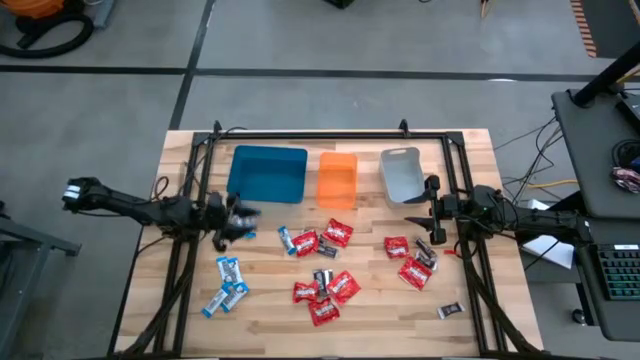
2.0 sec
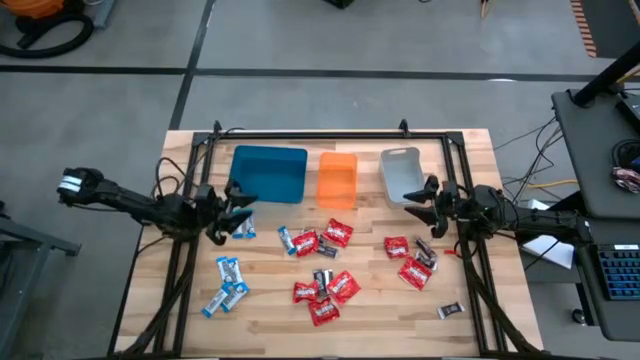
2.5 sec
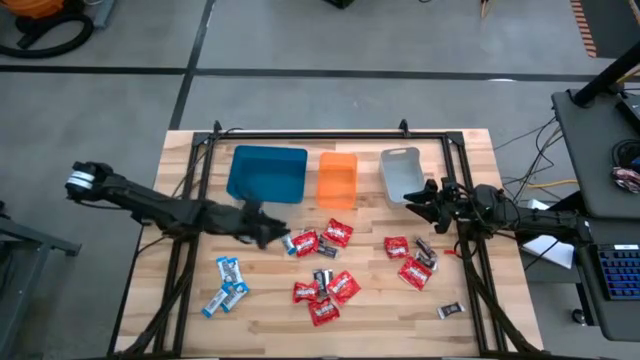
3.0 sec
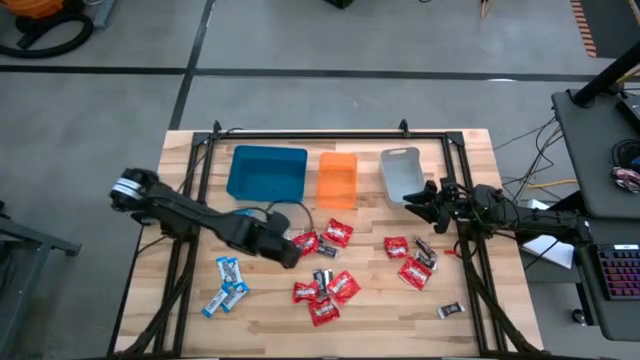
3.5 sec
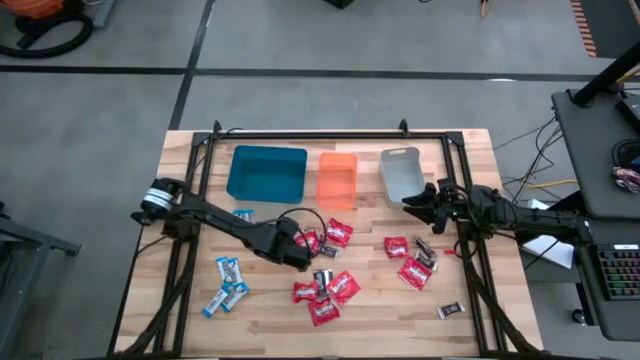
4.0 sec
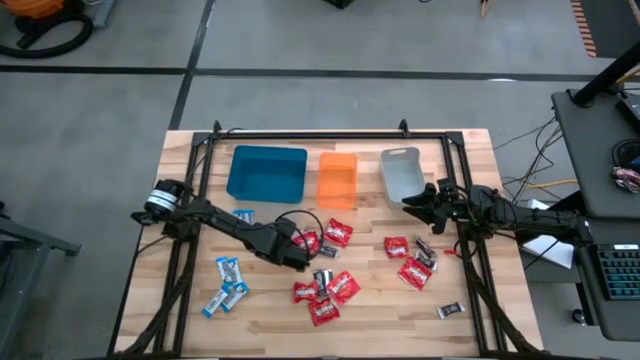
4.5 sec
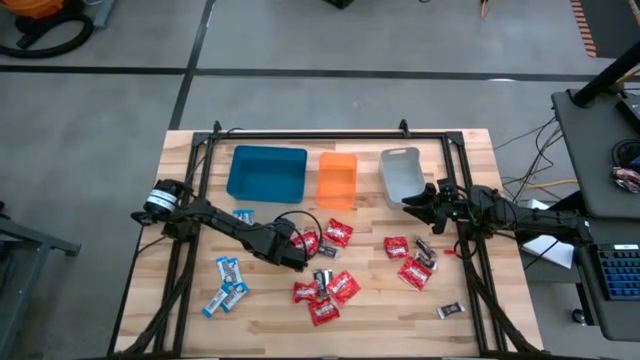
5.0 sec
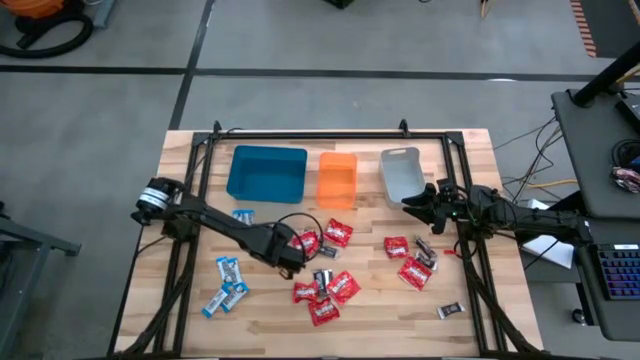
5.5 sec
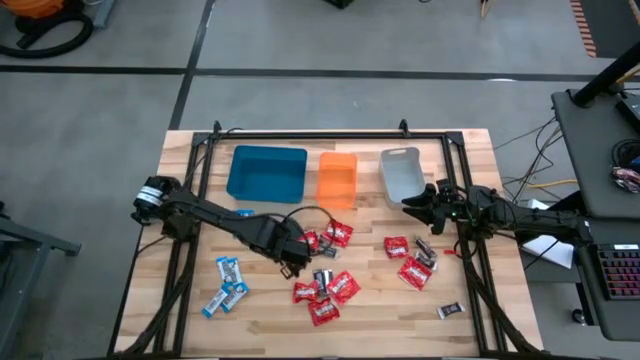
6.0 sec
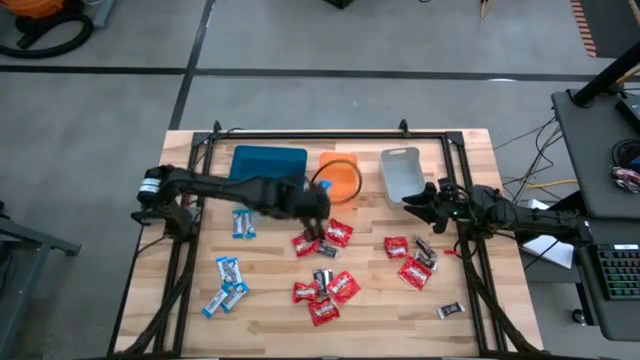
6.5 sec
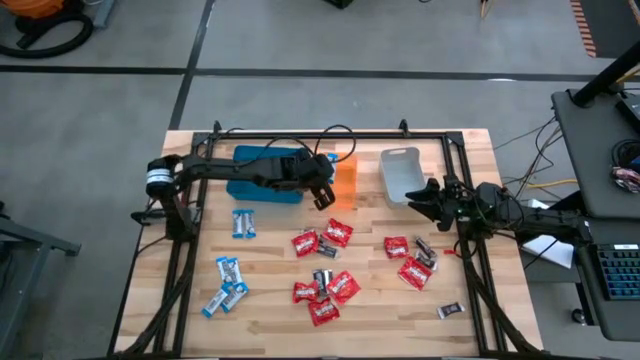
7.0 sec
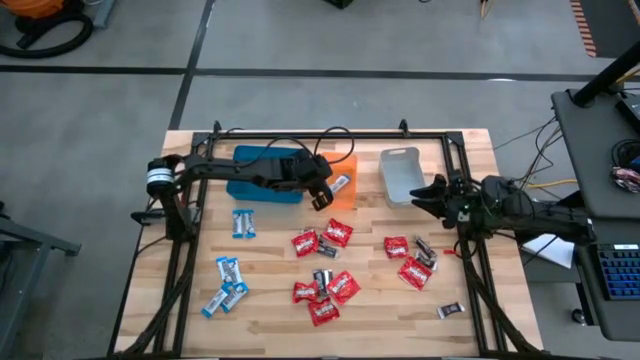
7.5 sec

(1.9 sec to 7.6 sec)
Task: Sort candy
Put the white chocolate bar into the orange bin

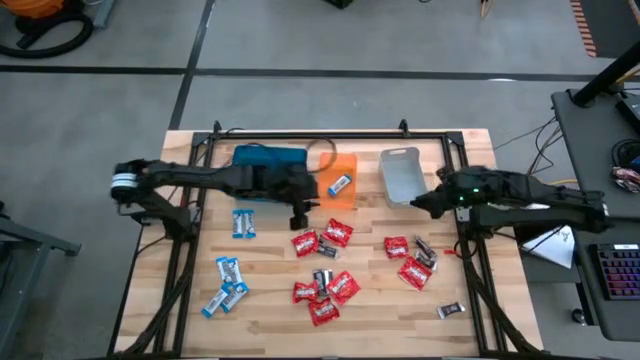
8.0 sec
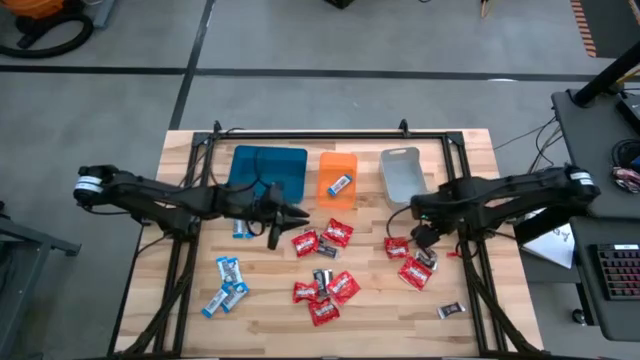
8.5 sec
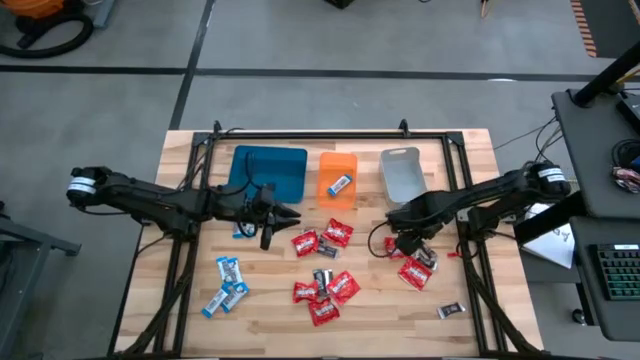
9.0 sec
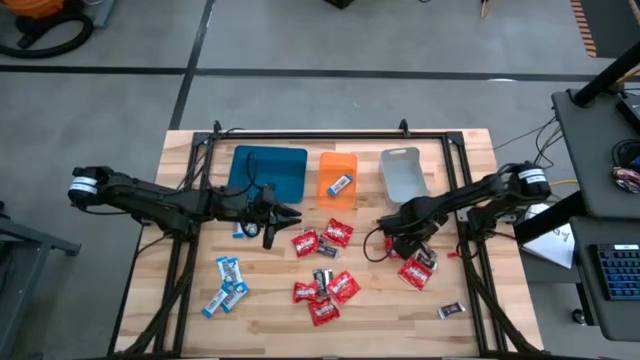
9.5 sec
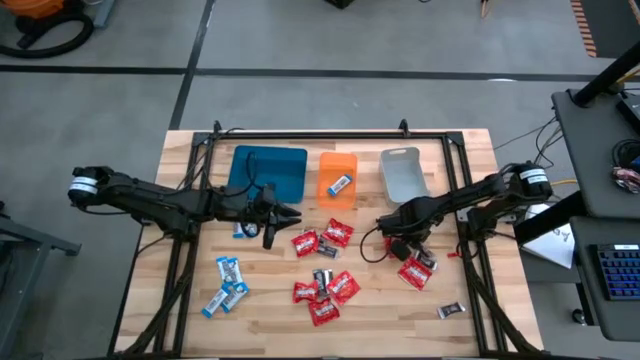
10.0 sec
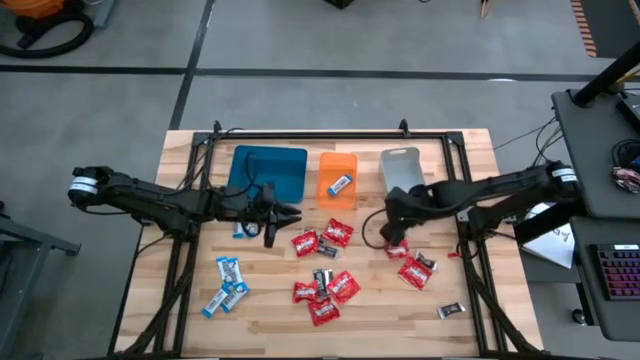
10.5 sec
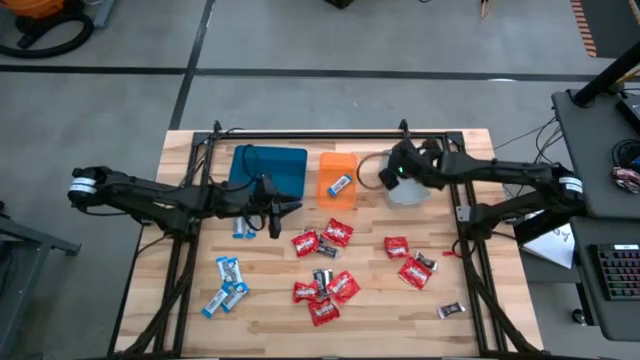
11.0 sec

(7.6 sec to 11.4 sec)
Put the brown chocolate bar into the gray bin

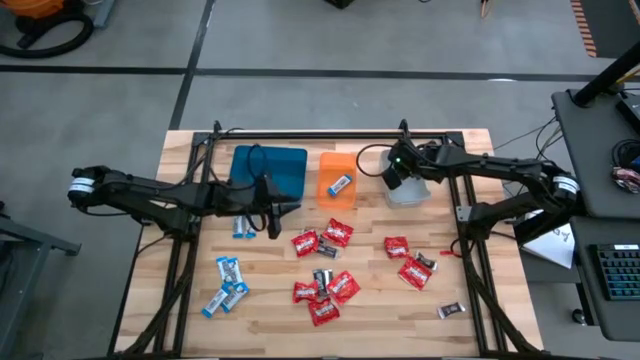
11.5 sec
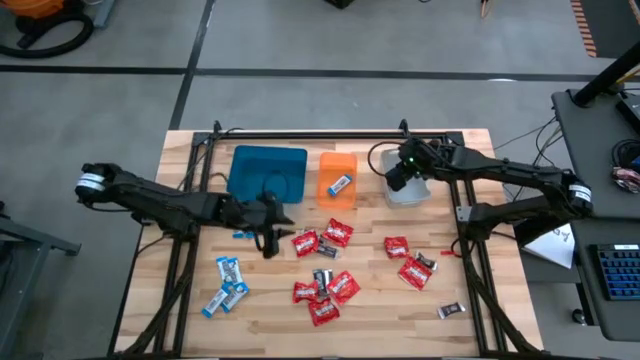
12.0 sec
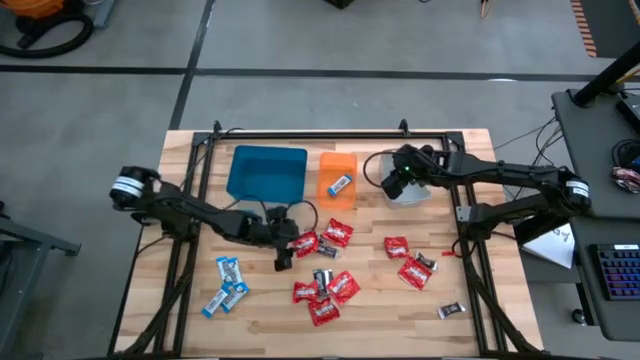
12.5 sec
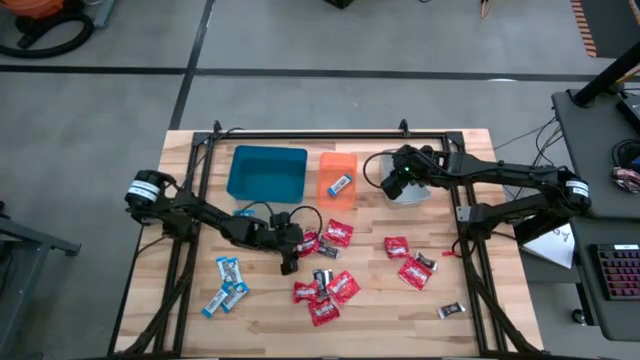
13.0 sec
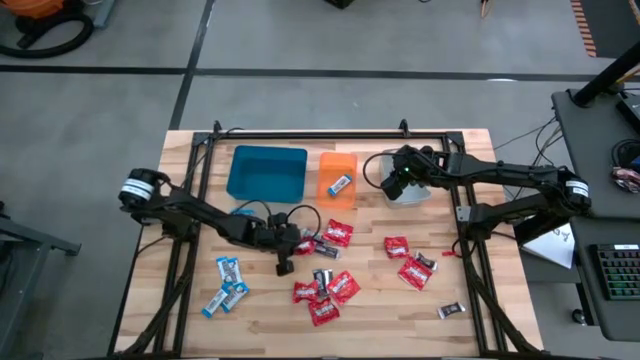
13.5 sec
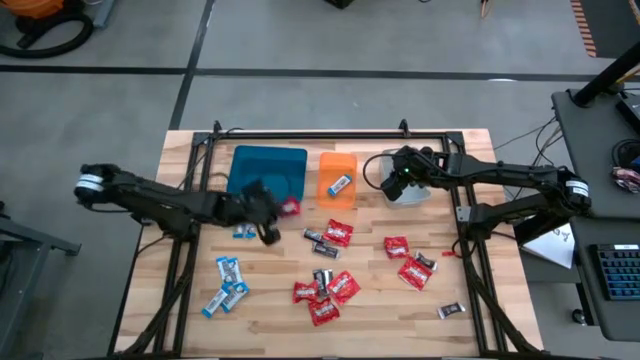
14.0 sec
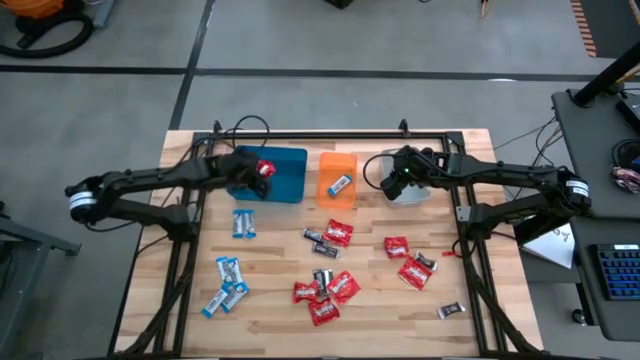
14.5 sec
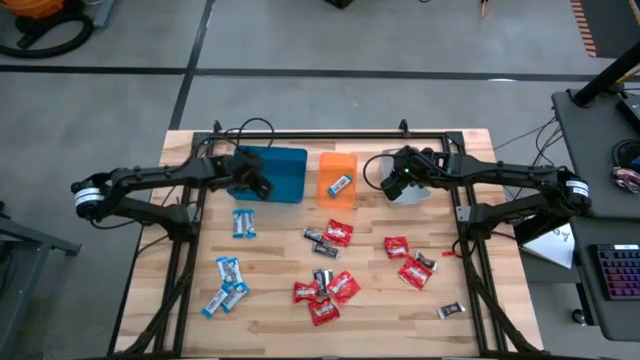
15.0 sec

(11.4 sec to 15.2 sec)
Put the red candy into the blue bin

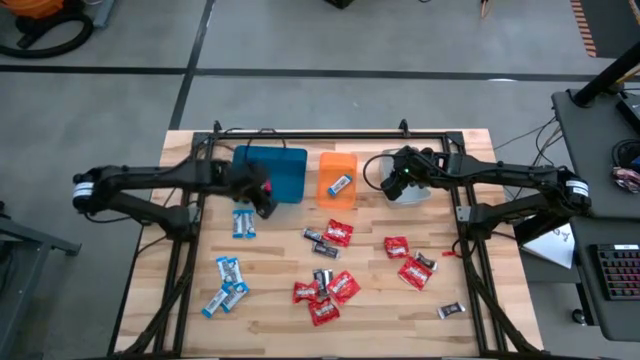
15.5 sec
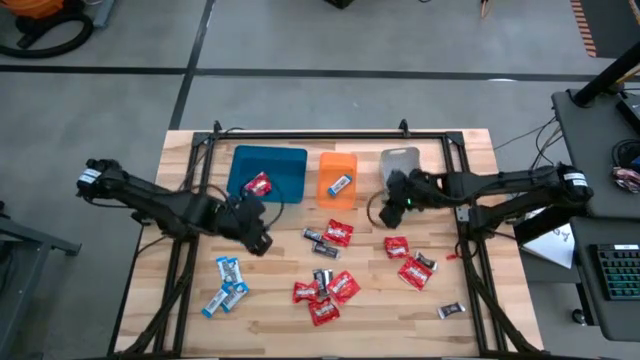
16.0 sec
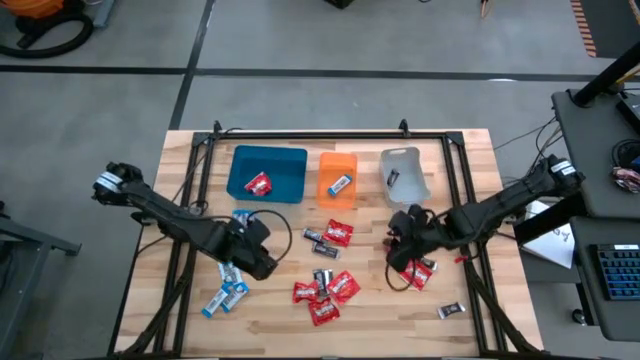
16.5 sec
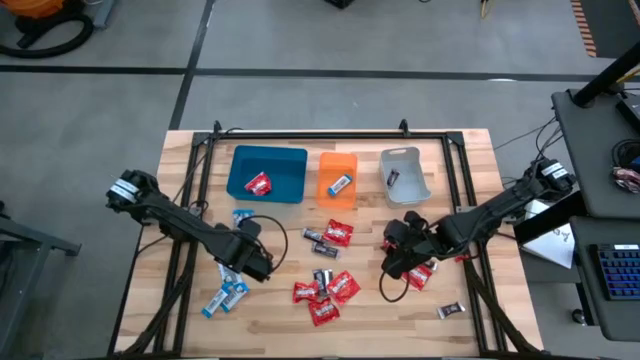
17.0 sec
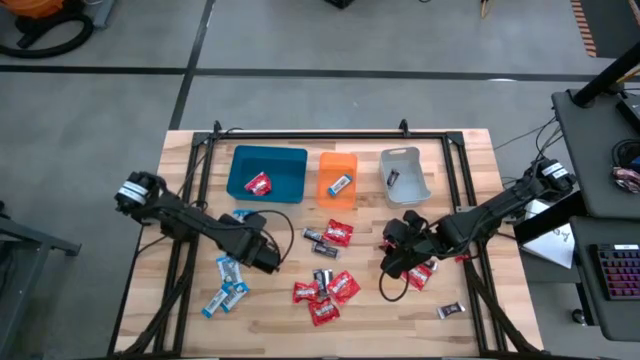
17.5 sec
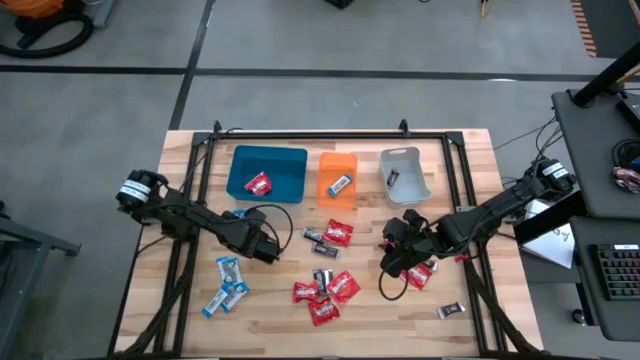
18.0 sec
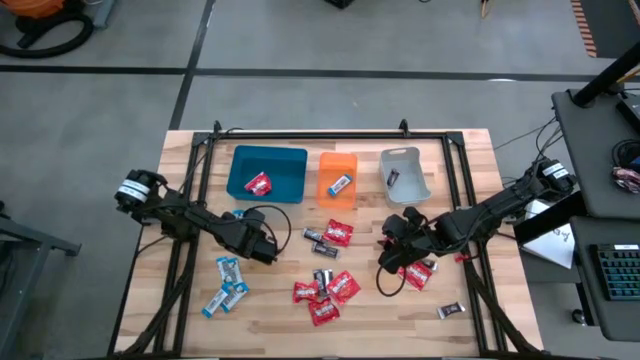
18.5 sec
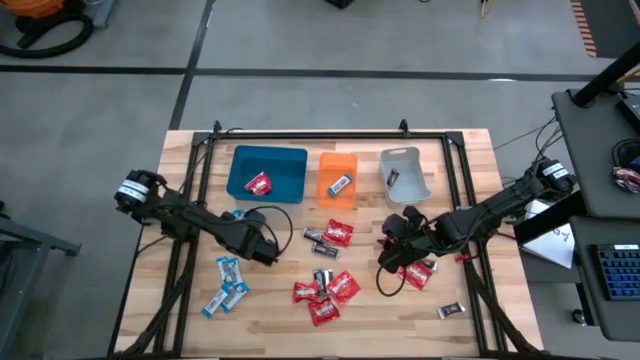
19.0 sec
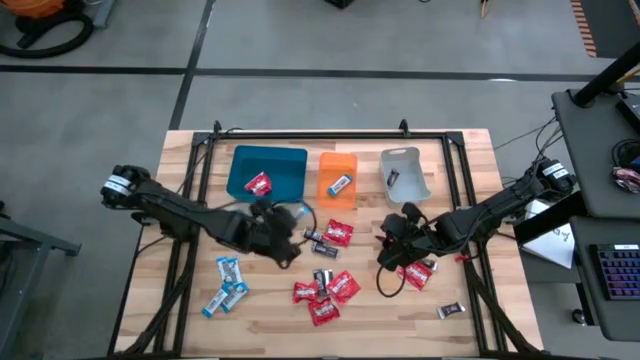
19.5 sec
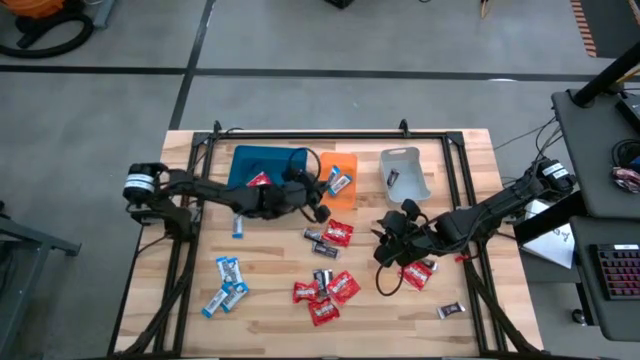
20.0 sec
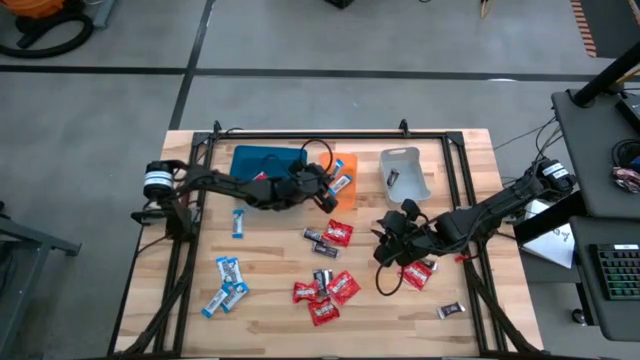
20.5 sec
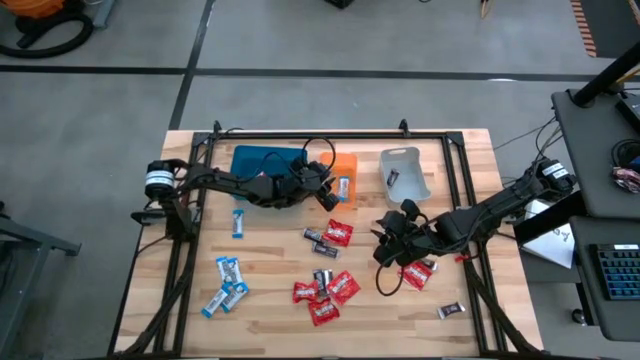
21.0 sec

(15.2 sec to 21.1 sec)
Put the white chocolate bar into the orange bin

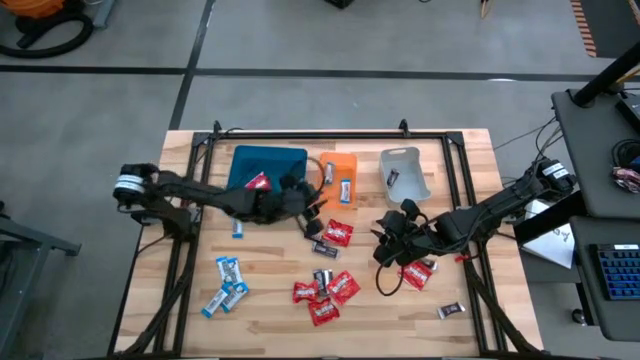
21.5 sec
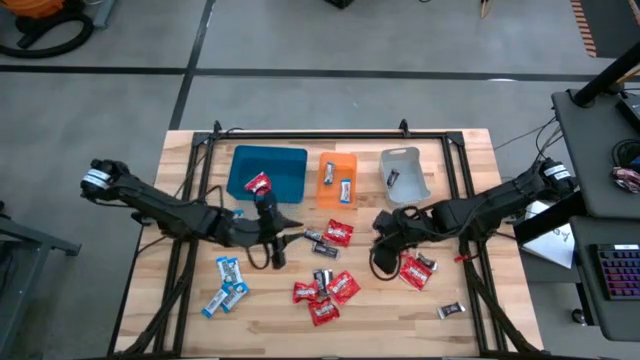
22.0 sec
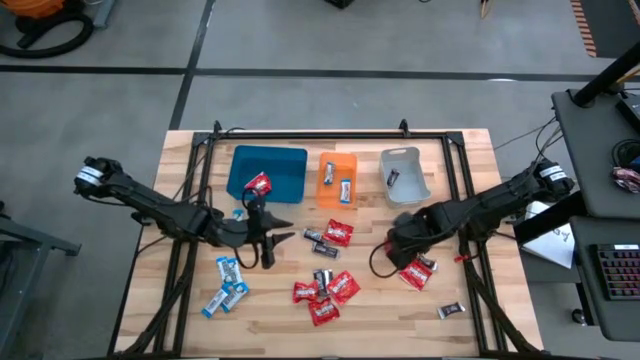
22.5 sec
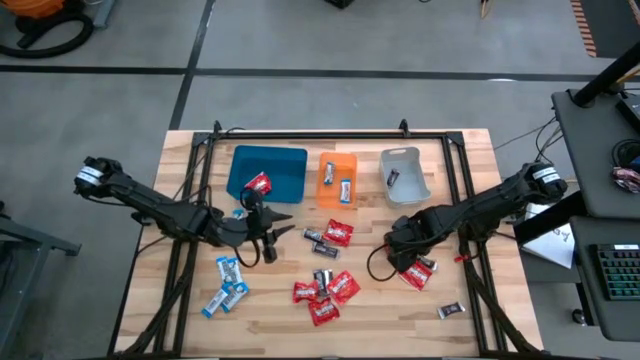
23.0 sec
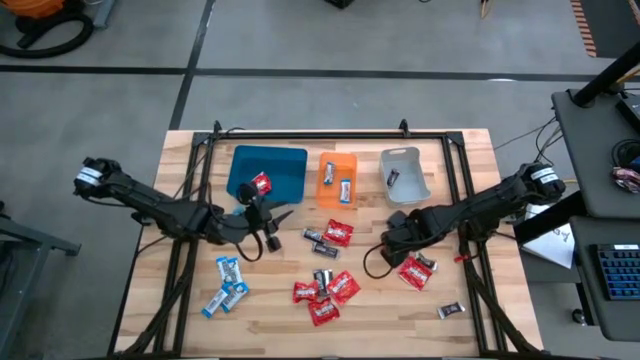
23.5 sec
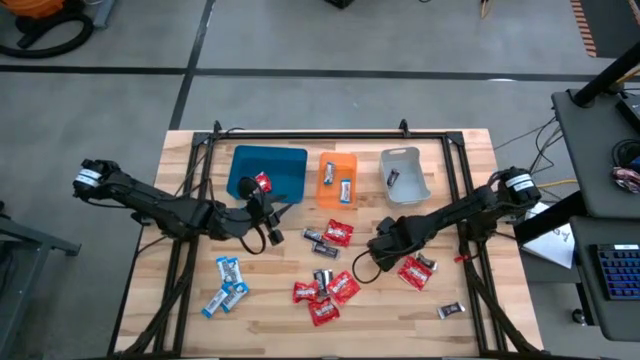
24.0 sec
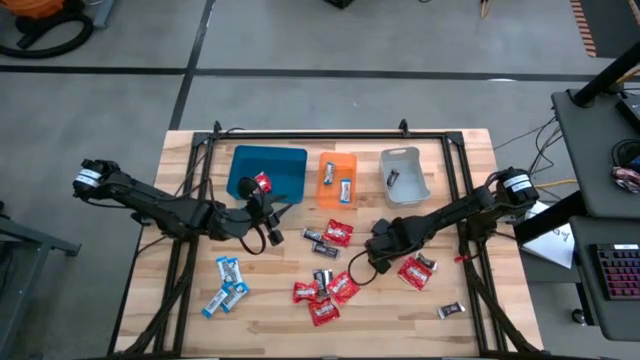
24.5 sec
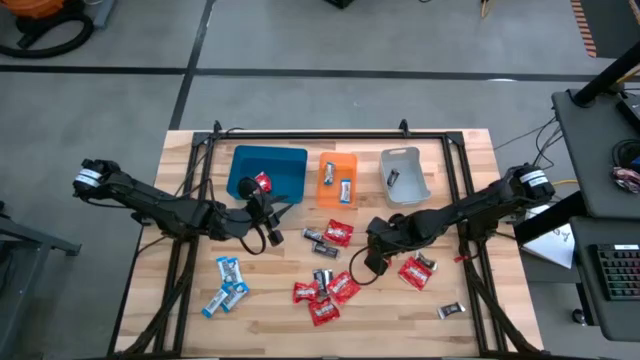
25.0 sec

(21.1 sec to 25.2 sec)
Put the red candy into the blue bin
